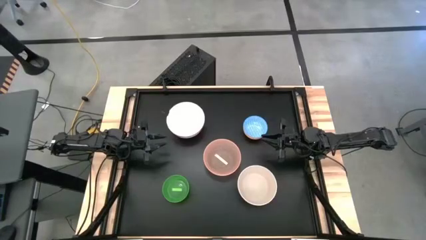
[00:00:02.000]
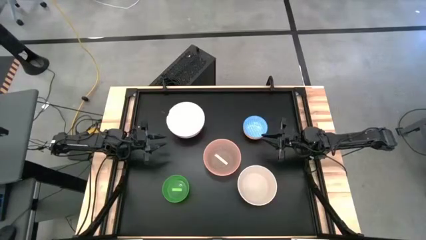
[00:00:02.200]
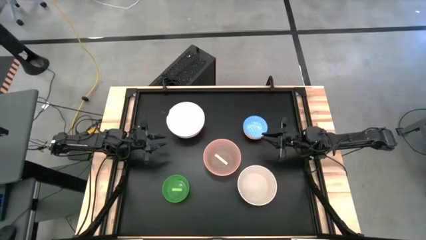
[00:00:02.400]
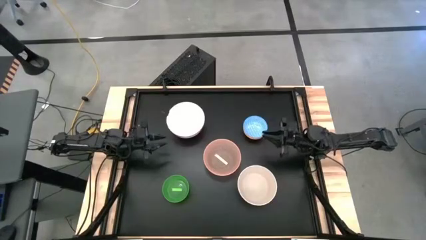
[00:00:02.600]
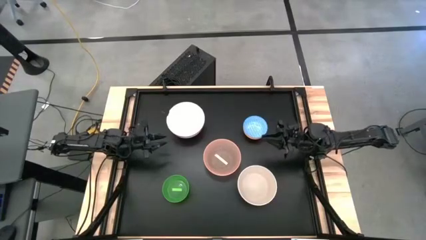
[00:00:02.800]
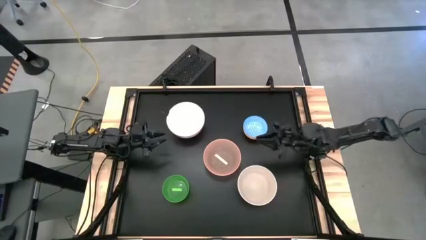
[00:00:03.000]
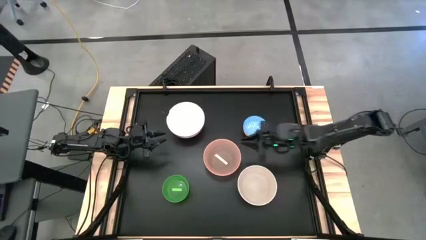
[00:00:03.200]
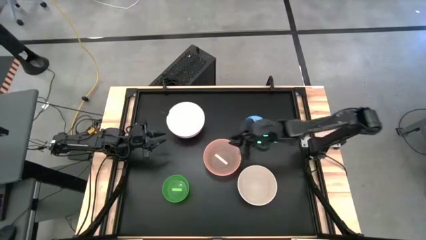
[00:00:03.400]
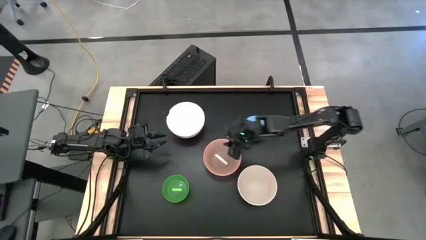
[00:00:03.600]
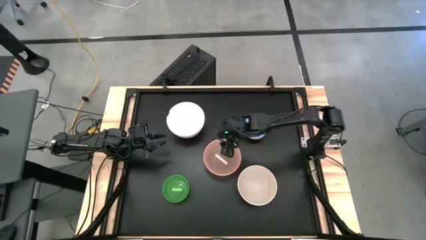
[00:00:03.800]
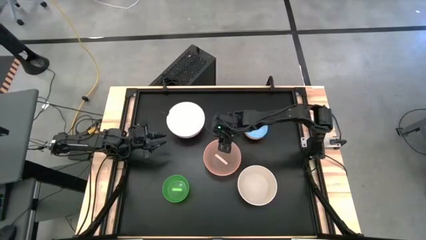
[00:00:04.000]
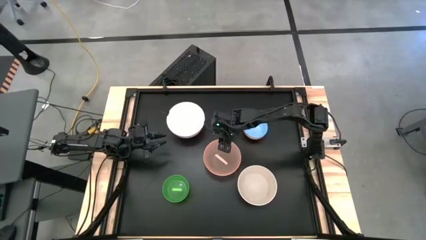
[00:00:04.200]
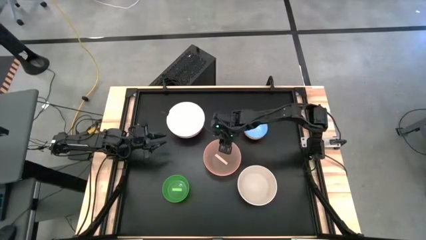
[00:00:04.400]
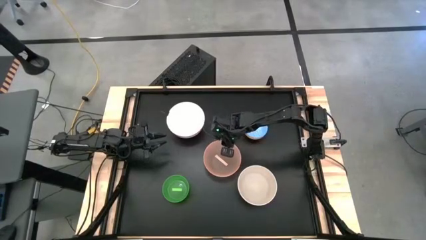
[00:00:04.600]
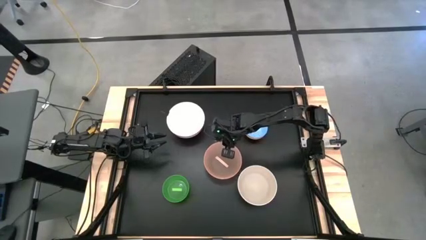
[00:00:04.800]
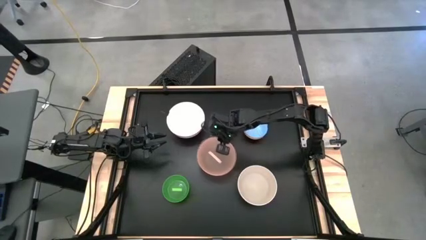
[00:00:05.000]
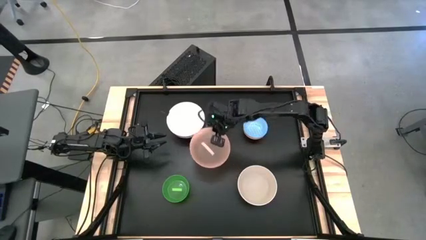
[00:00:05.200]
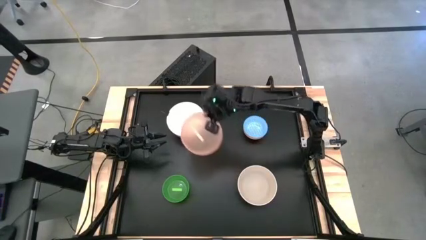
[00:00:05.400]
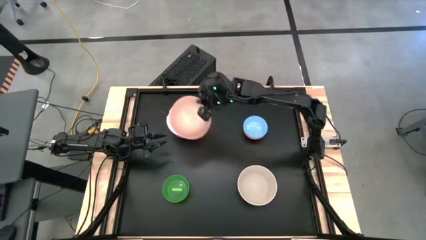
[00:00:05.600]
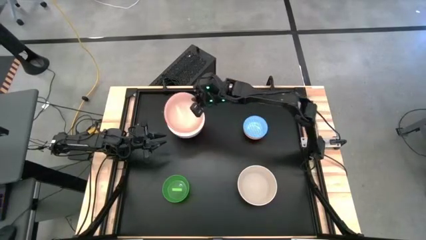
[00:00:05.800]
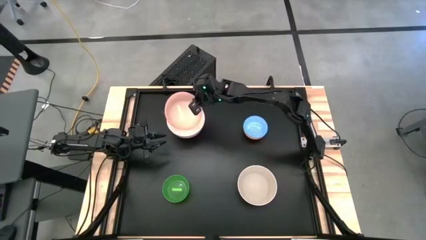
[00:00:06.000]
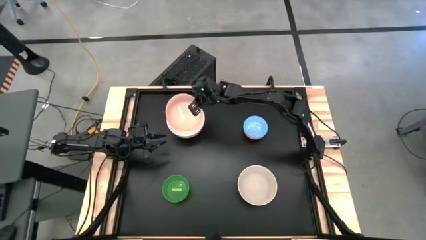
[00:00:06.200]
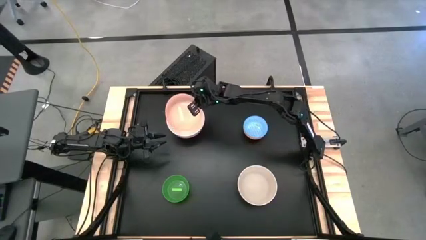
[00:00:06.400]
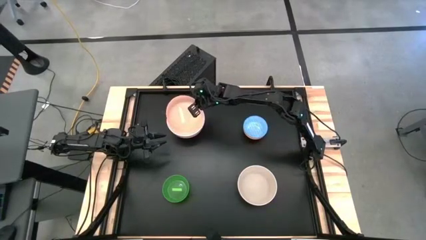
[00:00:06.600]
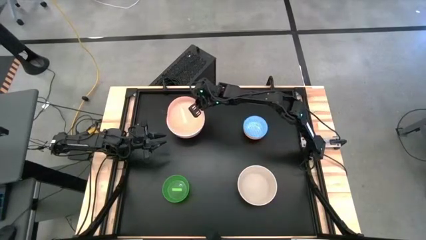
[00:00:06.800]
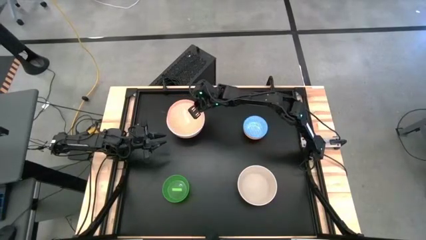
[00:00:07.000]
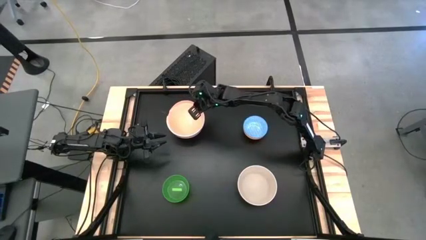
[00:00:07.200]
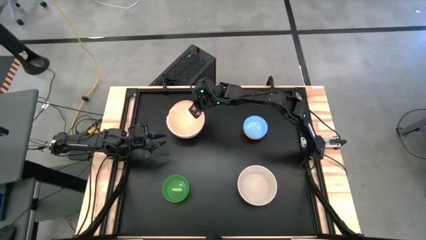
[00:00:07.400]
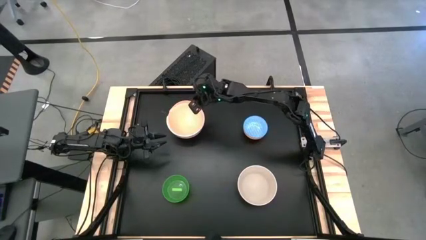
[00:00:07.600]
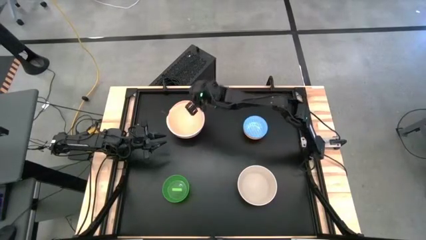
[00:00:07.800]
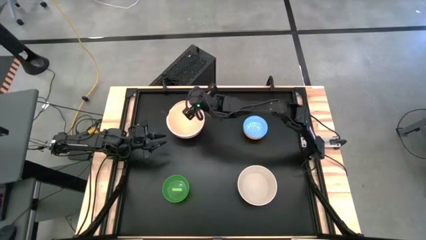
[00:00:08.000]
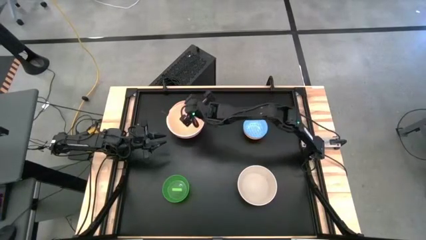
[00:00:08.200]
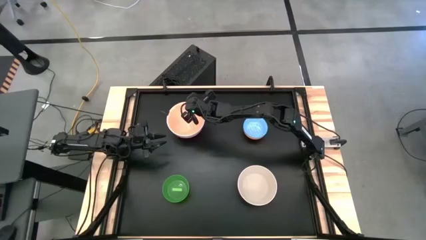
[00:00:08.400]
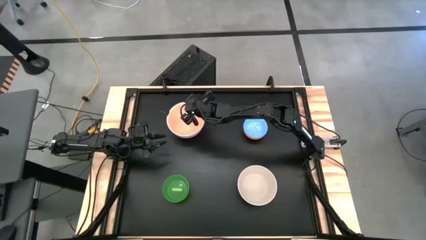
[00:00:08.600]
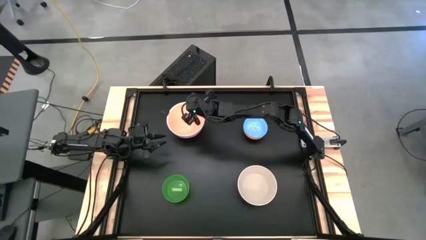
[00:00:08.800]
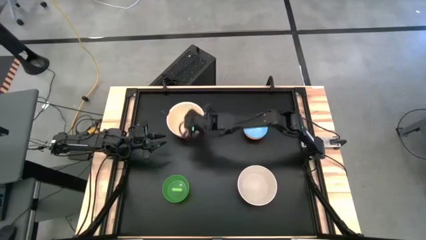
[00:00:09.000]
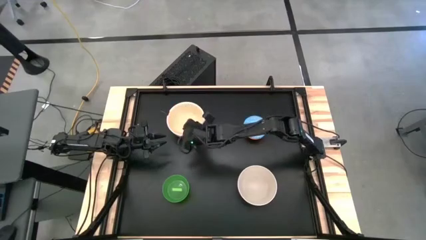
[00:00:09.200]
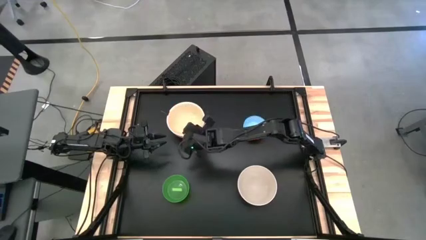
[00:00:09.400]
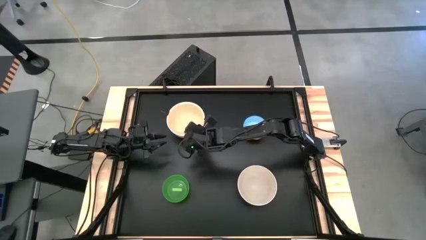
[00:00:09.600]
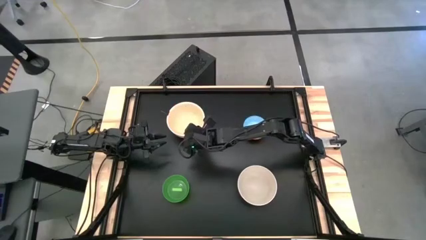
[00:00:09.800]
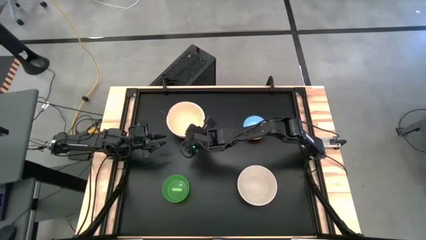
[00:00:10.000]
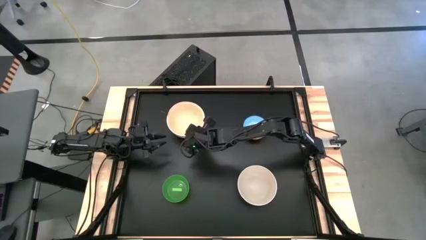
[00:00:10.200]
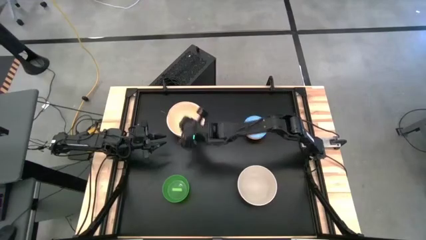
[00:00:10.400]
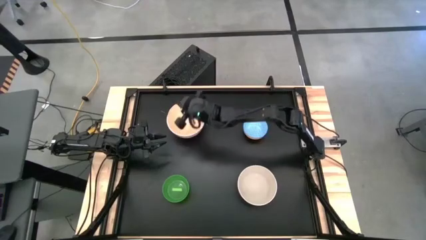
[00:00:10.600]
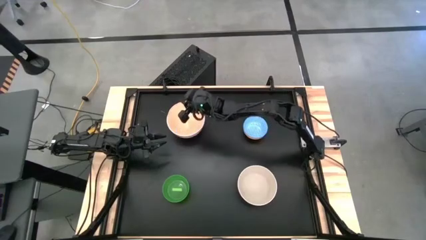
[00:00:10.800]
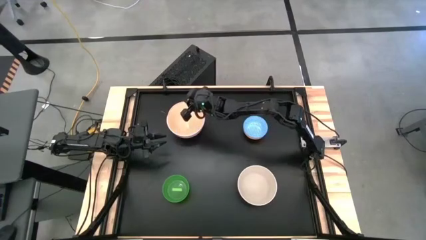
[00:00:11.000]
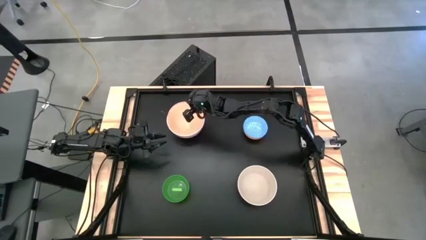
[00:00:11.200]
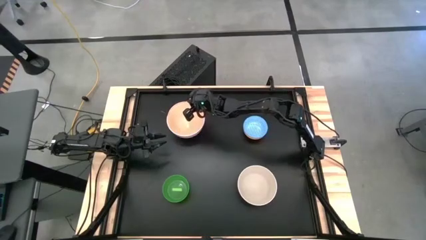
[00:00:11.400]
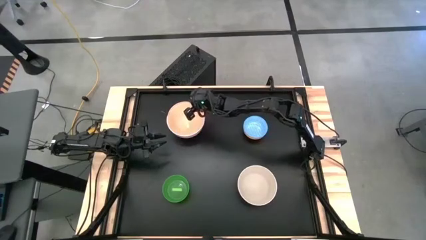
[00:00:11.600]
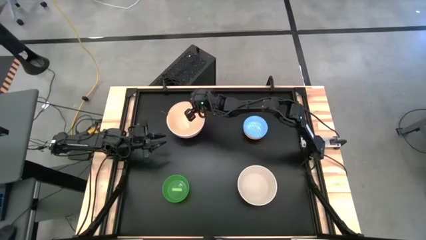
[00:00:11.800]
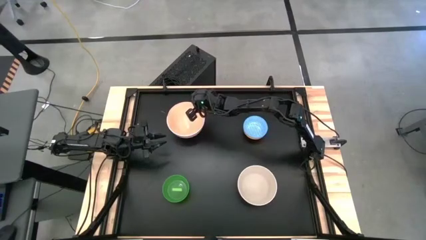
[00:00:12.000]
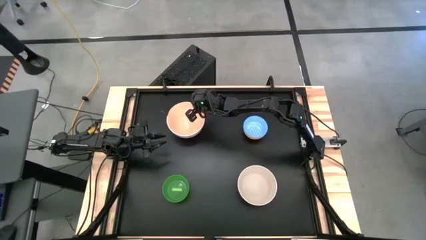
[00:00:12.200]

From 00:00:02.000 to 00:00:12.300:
Stack the orange bowl on the white bowl

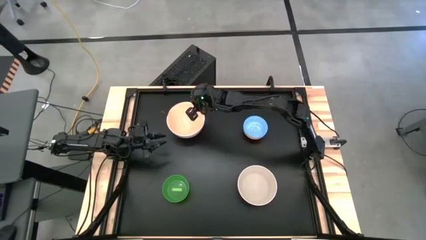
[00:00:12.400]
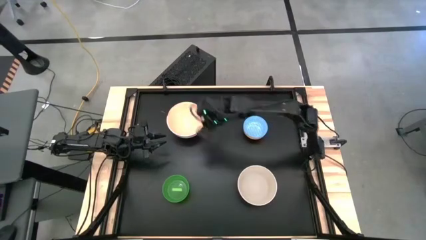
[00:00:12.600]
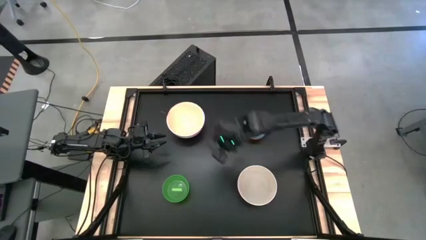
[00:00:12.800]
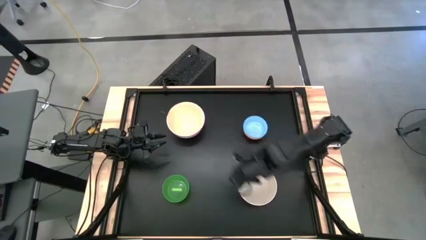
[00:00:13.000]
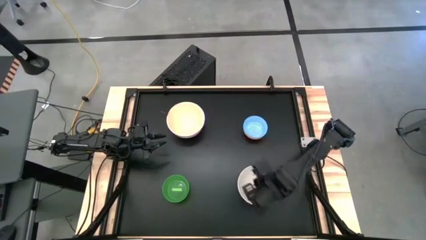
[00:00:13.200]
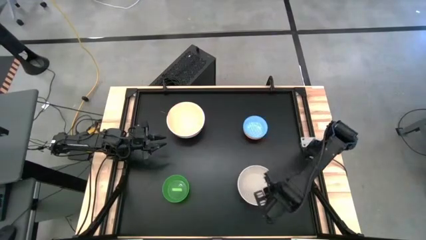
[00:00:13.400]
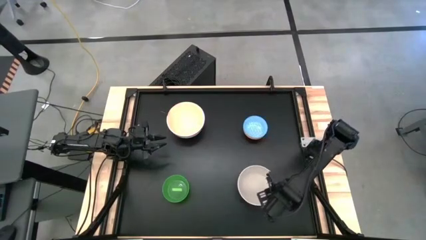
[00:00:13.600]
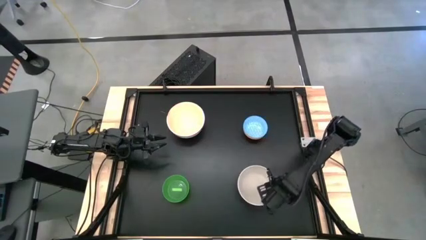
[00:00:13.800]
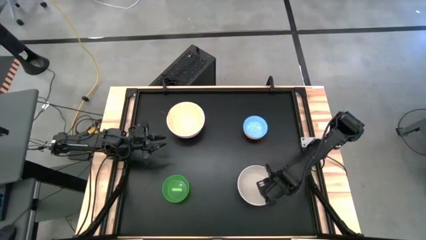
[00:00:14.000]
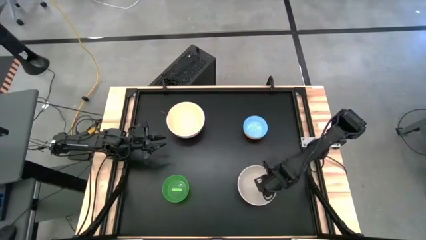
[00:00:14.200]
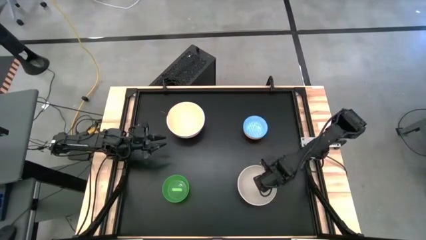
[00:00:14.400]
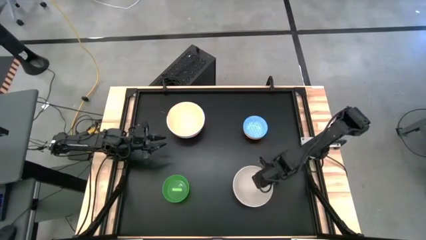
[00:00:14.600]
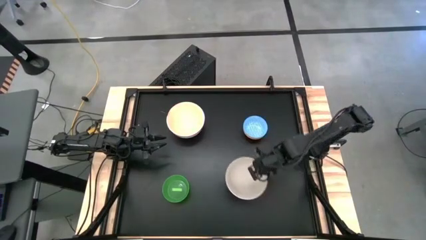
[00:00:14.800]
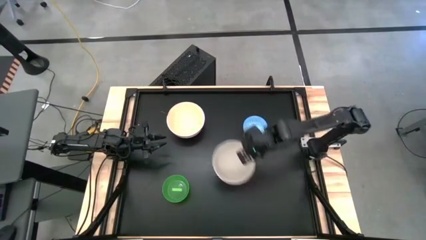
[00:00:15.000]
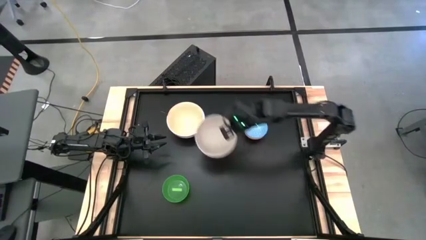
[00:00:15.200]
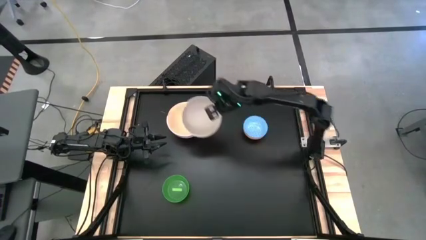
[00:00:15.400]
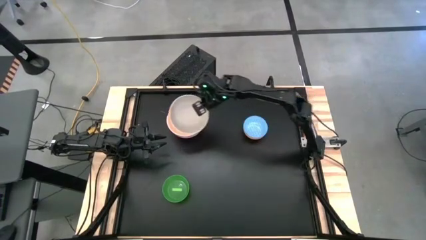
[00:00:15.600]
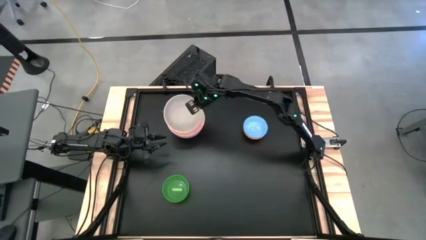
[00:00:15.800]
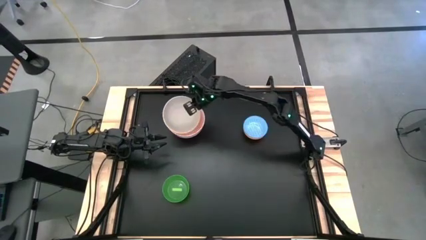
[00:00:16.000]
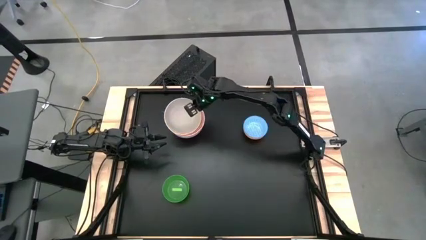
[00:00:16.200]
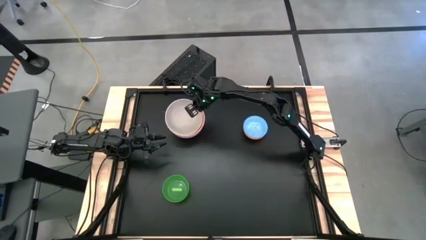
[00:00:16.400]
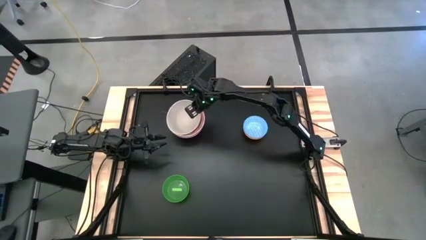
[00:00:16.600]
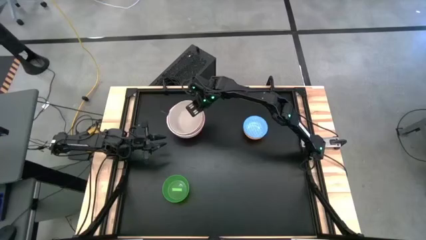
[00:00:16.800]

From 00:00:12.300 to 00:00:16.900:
Stack the gray bowl on the orange bowl
